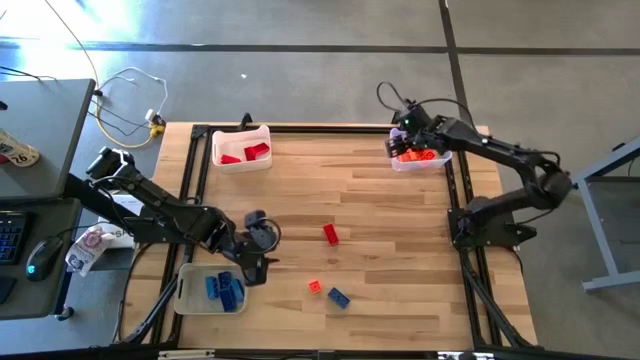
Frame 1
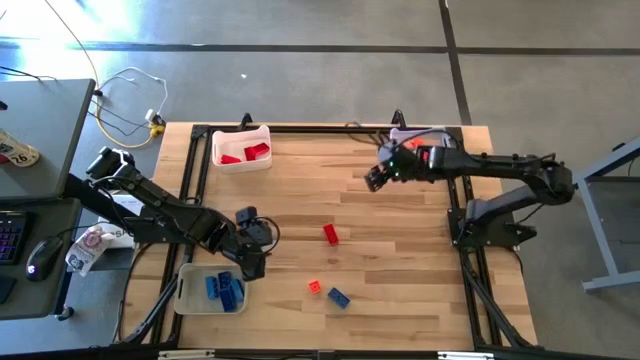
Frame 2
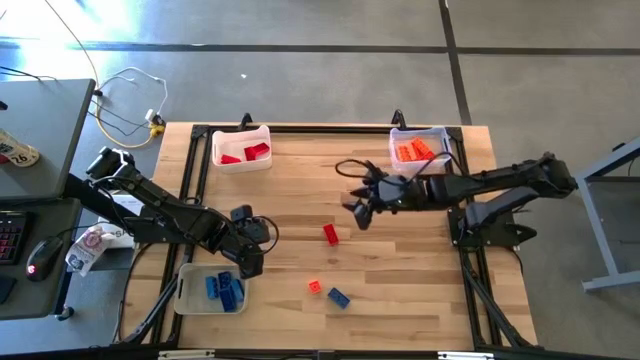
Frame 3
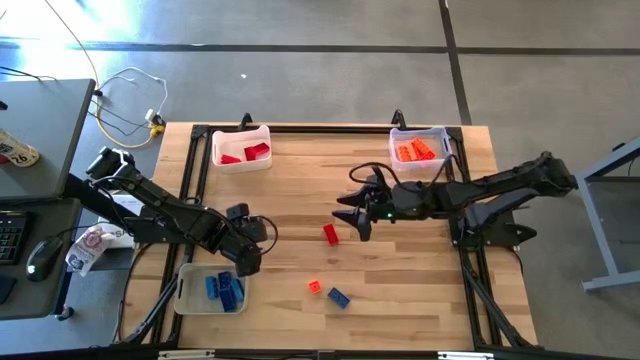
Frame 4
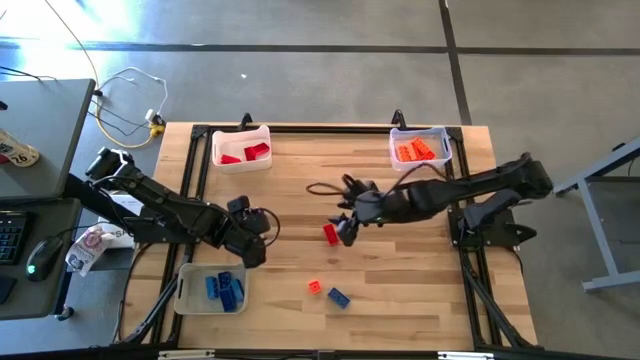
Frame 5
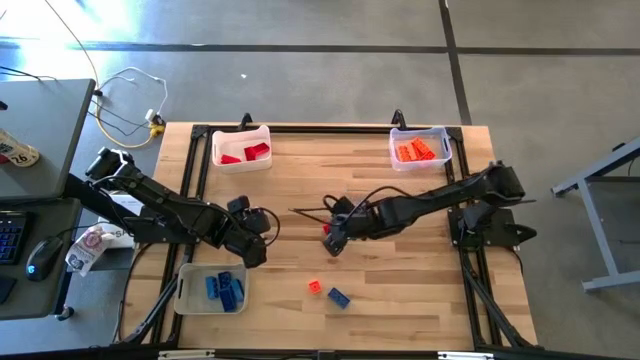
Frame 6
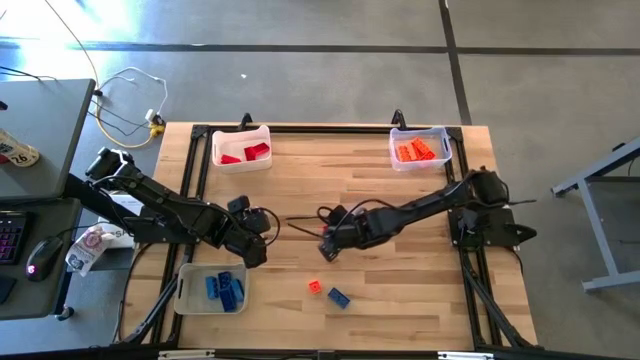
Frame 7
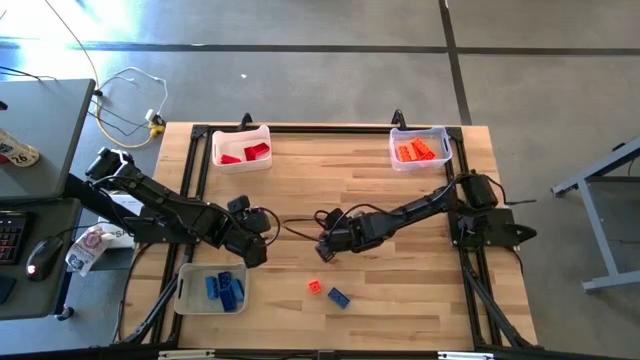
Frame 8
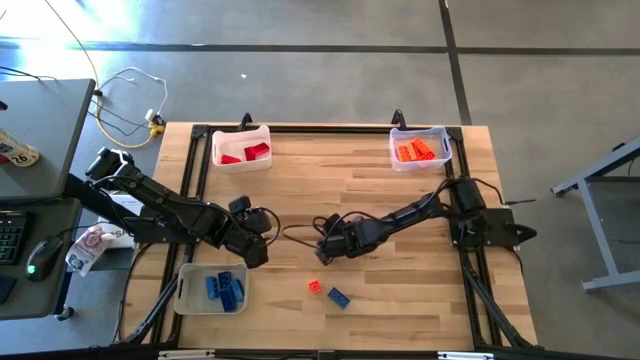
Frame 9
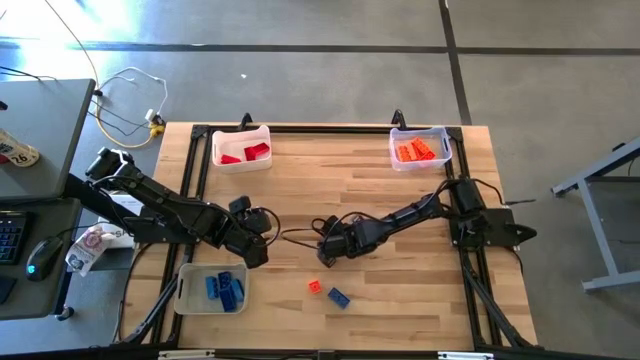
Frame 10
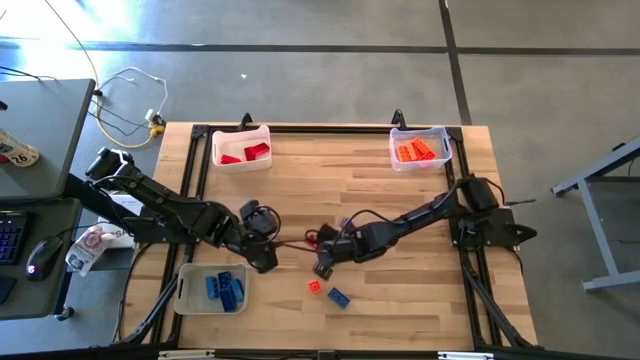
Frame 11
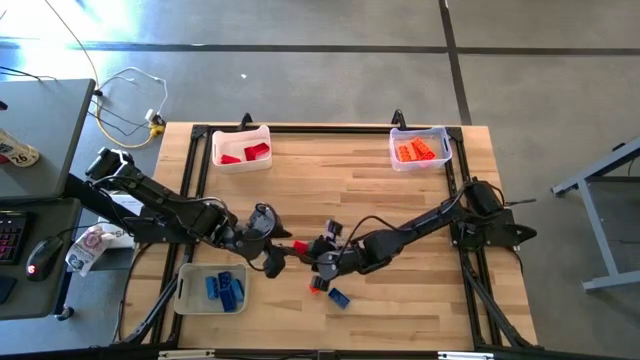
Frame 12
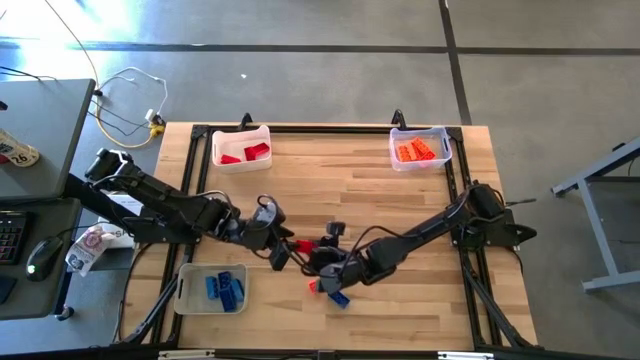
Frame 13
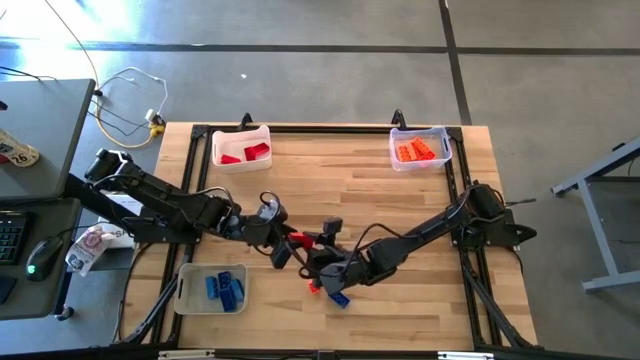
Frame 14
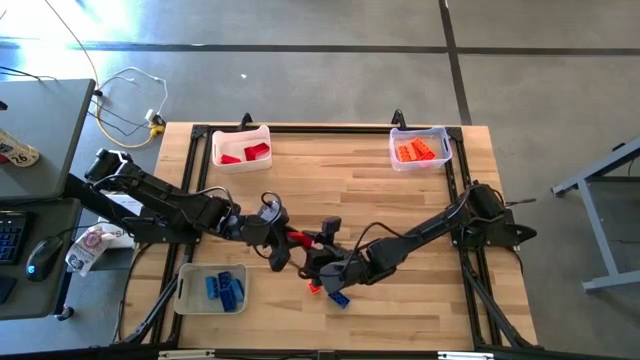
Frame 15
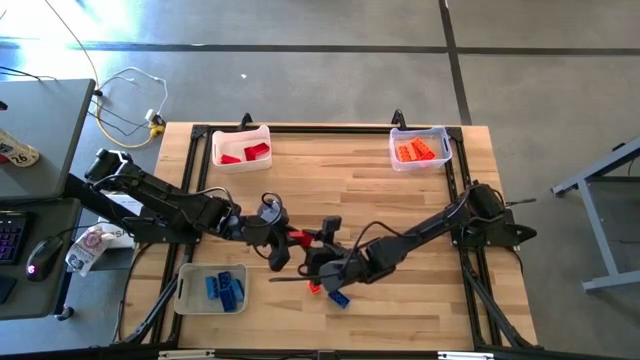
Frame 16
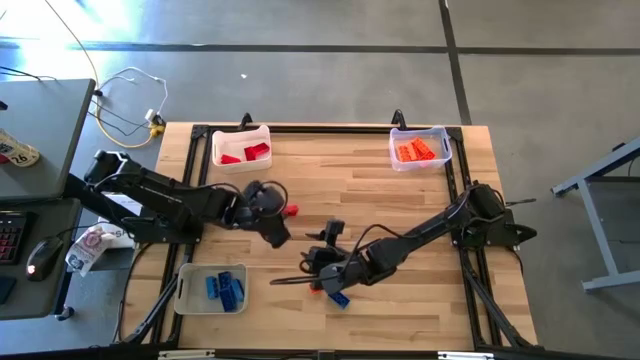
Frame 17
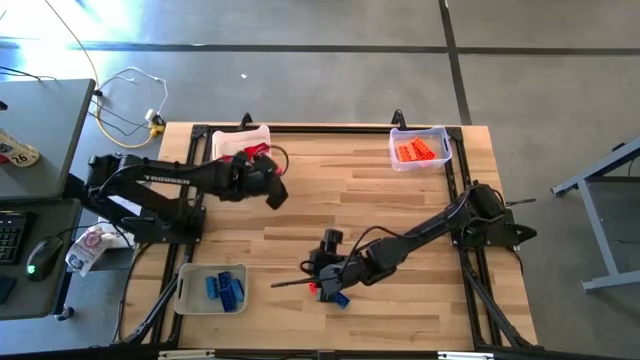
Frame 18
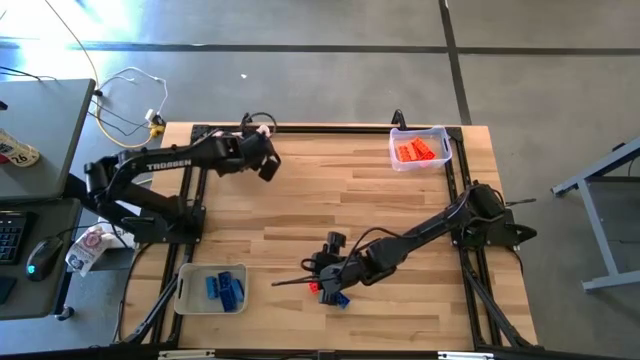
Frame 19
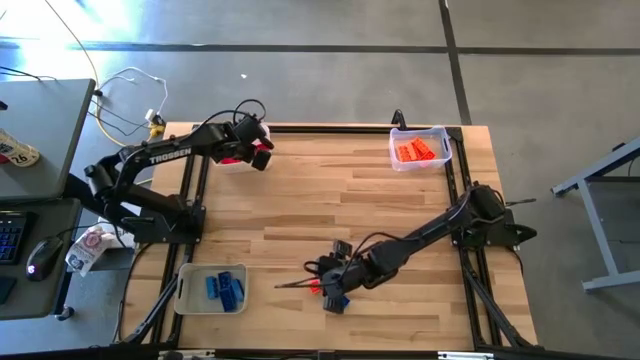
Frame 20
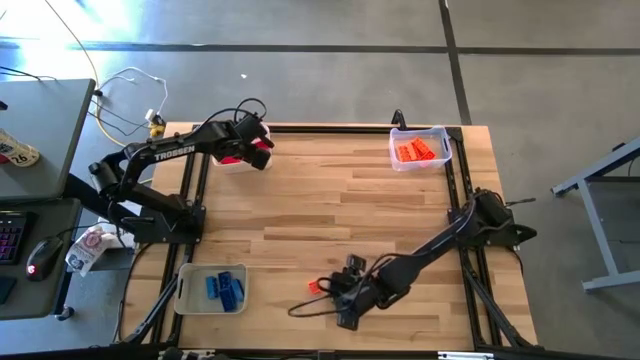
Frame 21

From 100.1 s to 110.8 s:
Task: Sort & place blocks by color
Put the red game piece into the white bin

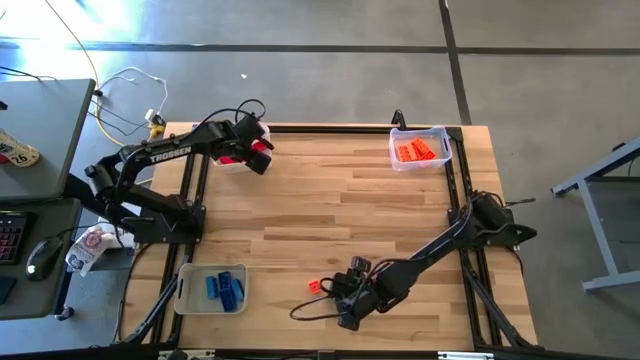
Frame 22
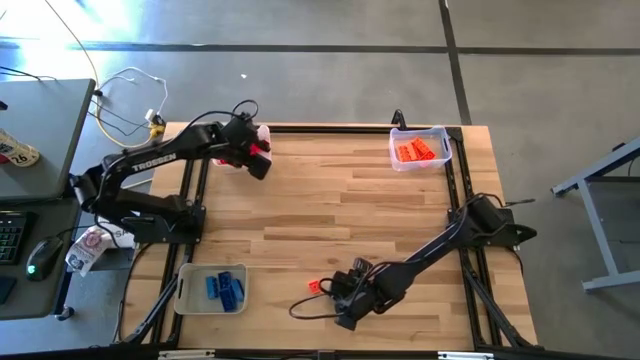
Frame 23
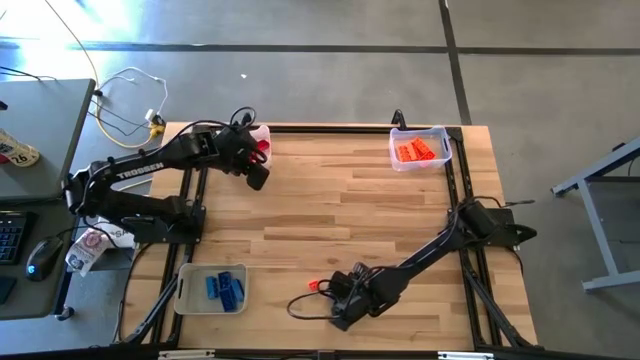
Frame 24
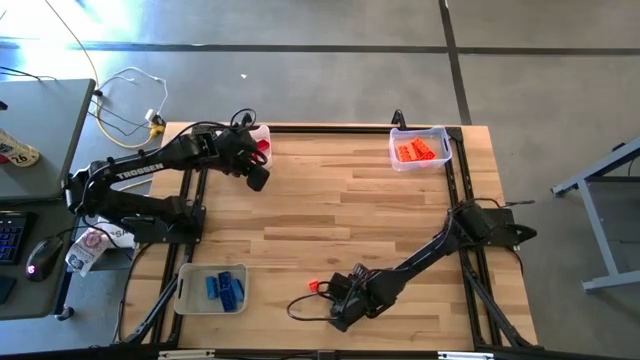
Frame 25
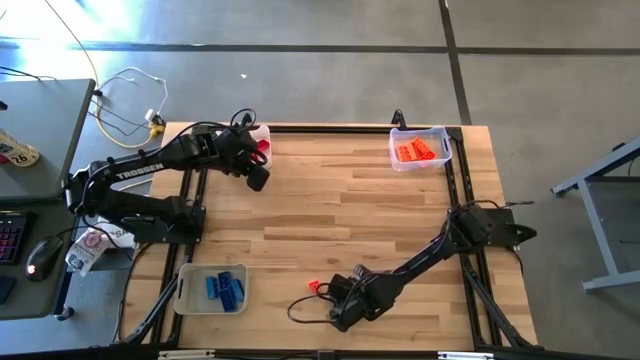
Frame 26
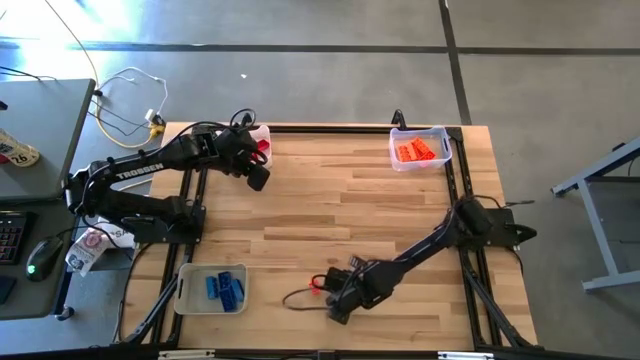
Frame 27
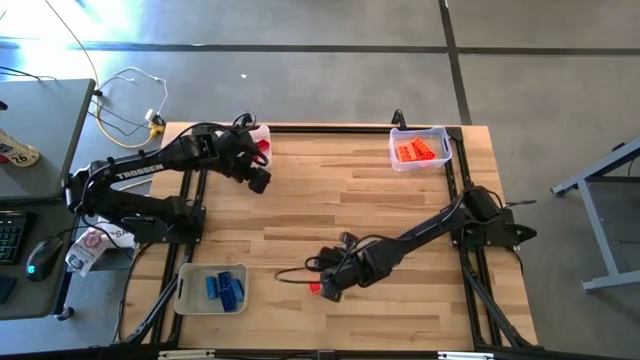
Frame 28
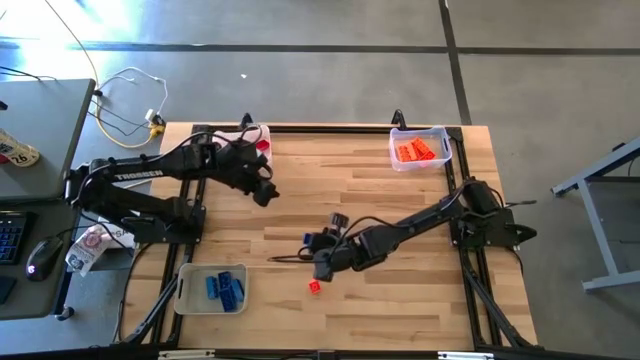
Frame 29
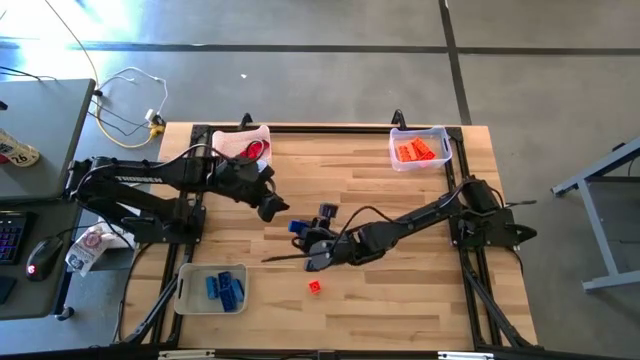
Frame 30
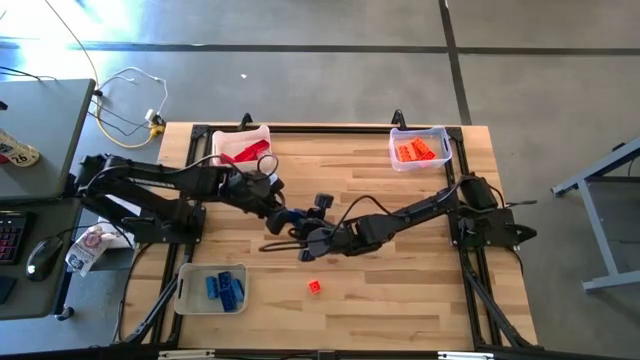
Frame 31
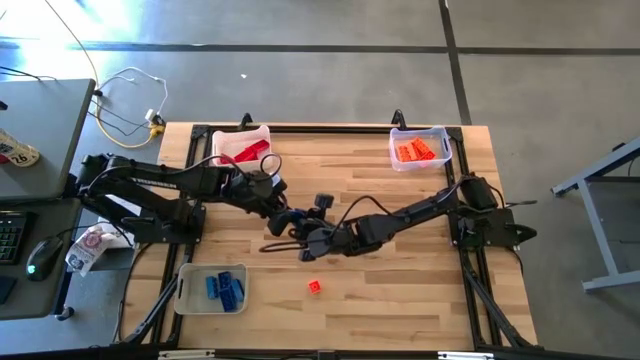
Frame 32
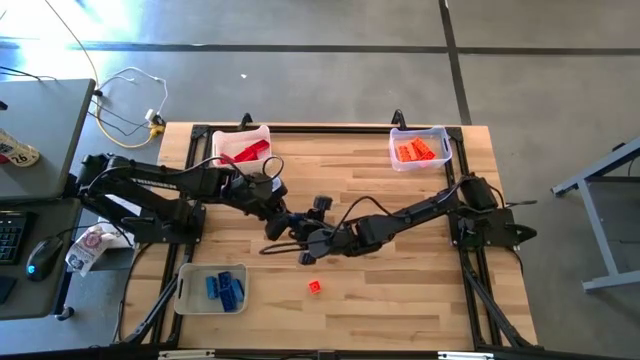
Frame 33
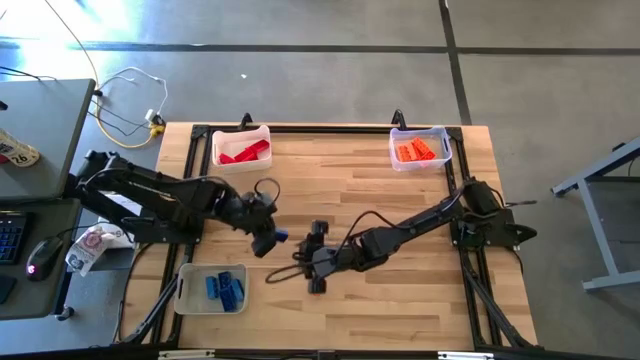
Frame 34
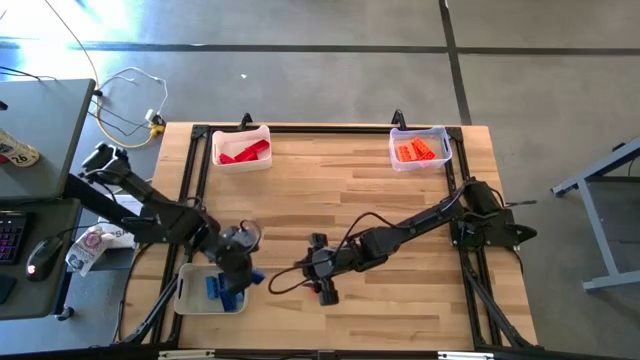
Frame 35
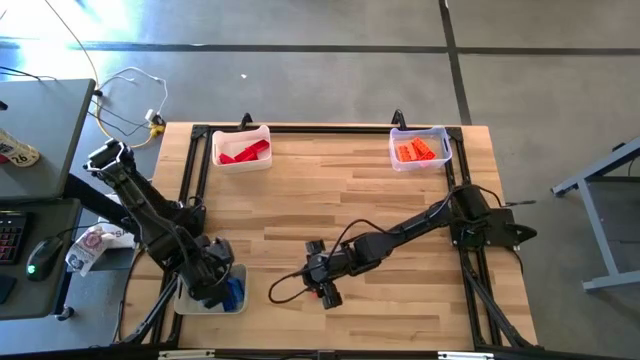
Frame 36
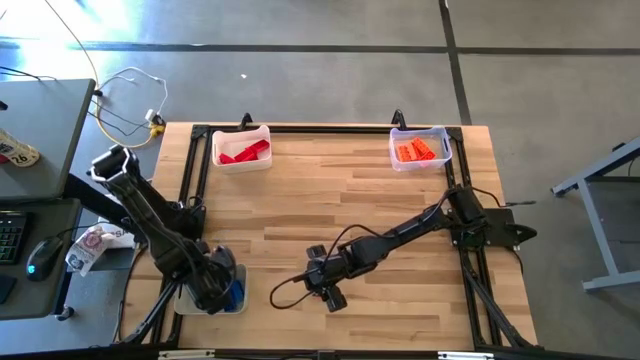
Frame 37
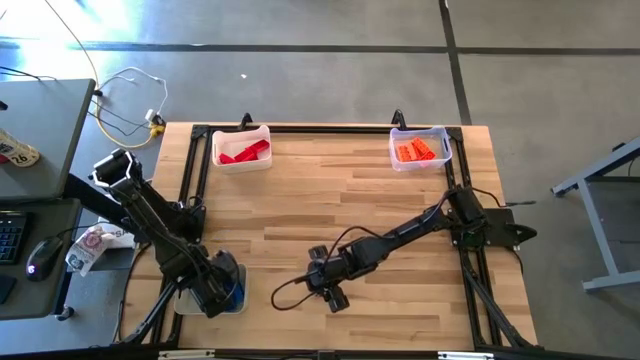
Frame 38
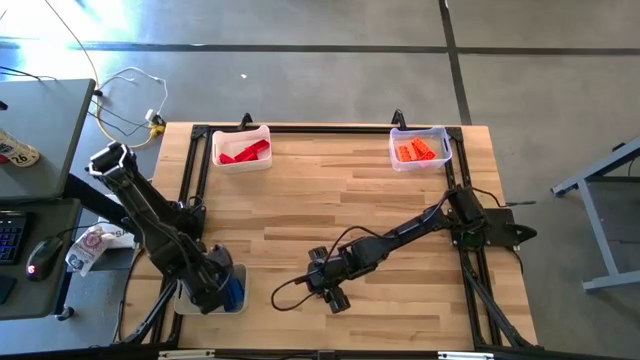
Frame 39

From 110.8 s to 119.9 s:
Put the blue game piece into the gray bin

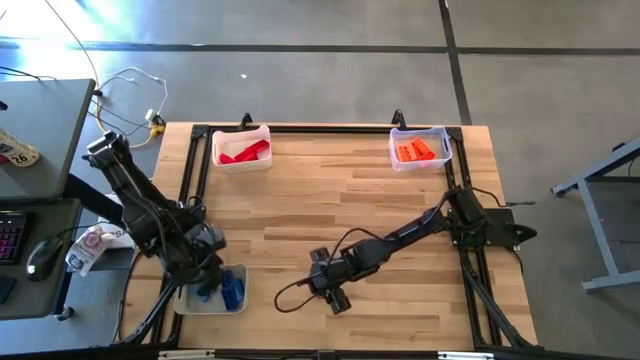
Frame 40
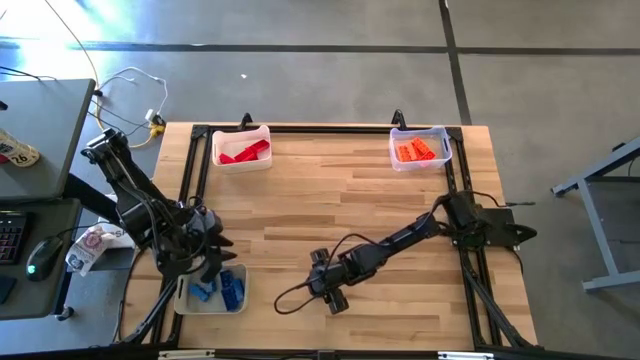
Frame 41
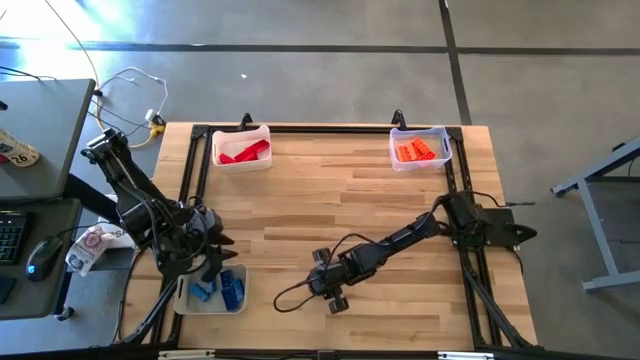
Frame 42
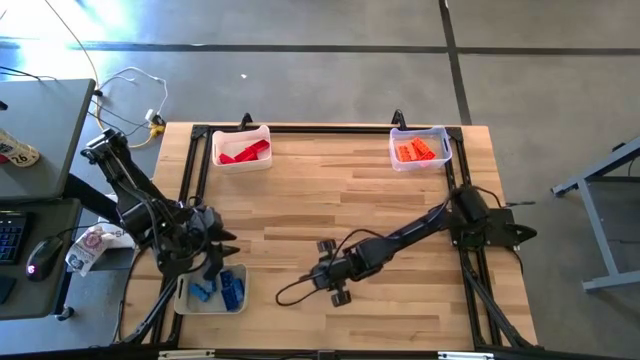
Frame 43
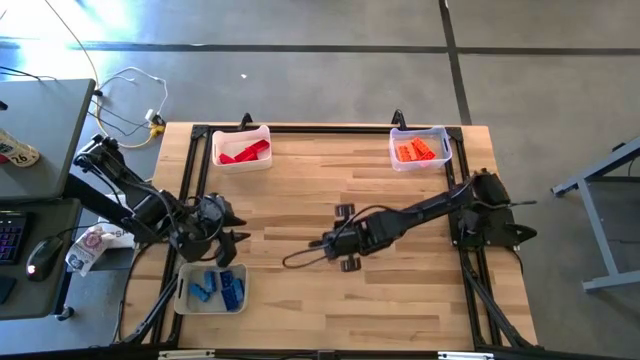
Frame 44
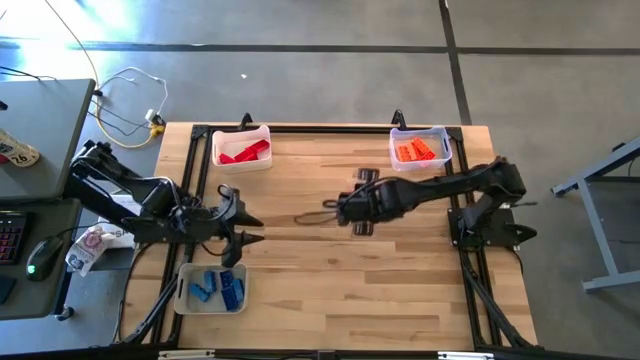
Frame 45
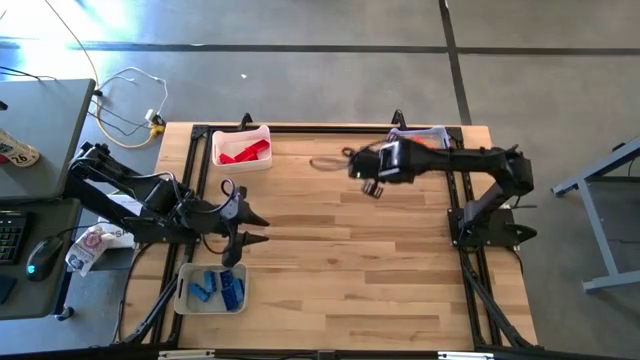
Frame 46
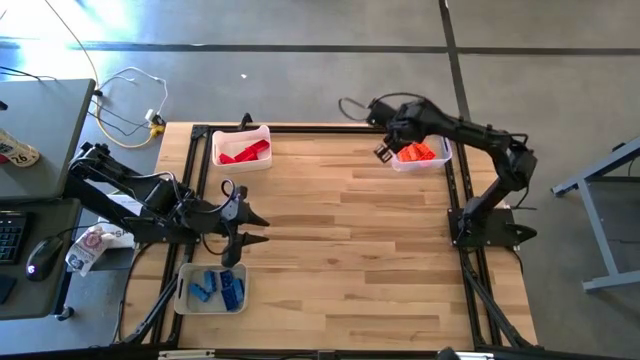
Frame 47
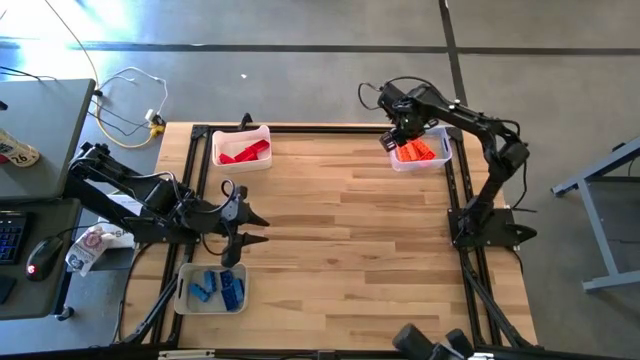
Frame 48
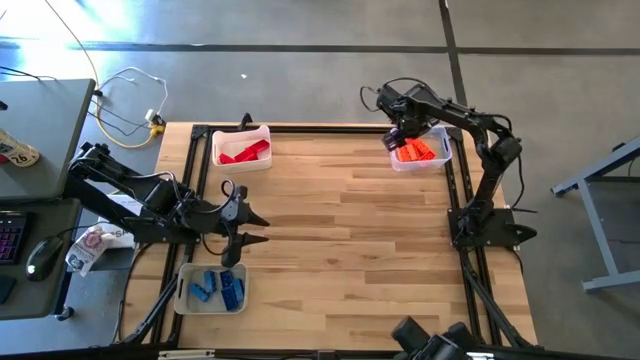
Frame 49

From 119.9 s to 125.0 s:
Put the orange game piece into the transparent bin
